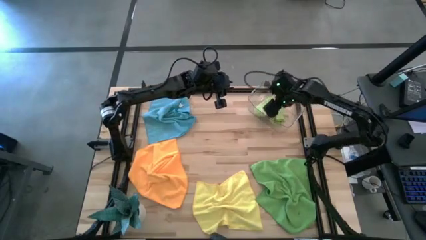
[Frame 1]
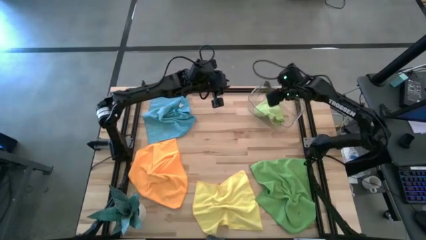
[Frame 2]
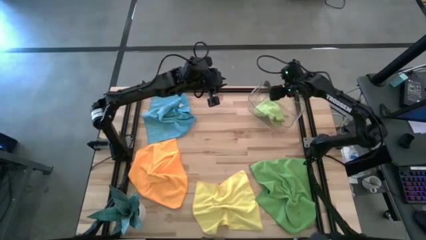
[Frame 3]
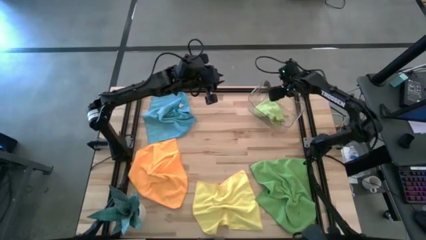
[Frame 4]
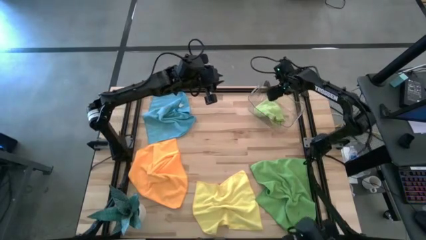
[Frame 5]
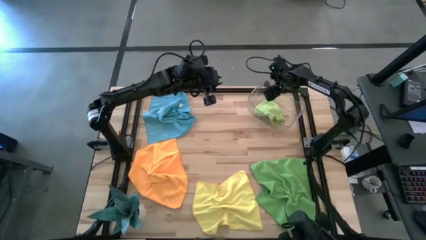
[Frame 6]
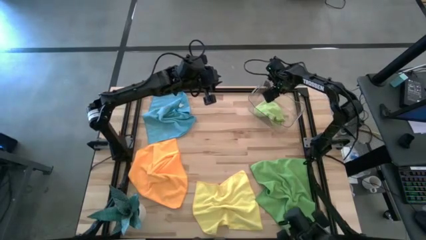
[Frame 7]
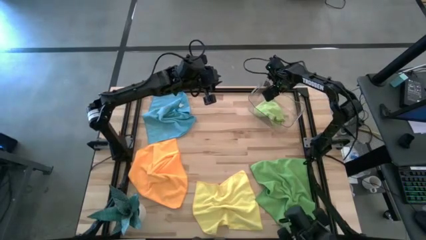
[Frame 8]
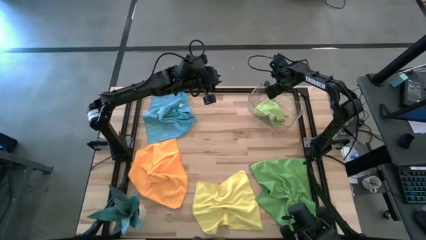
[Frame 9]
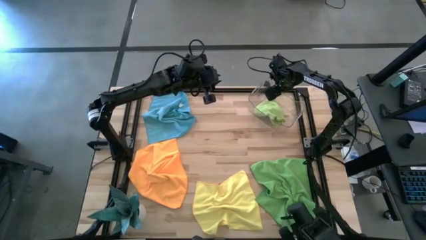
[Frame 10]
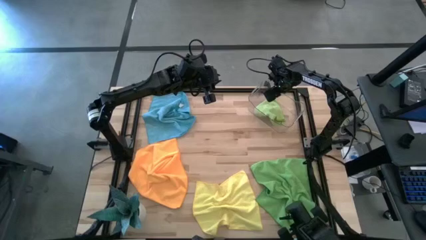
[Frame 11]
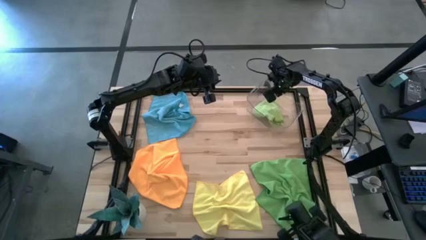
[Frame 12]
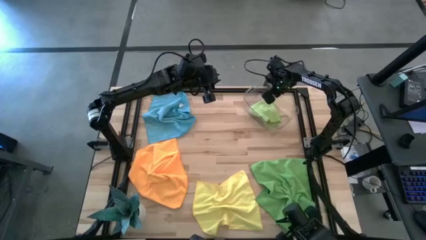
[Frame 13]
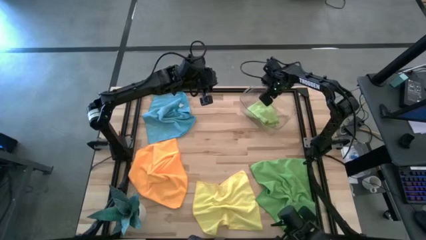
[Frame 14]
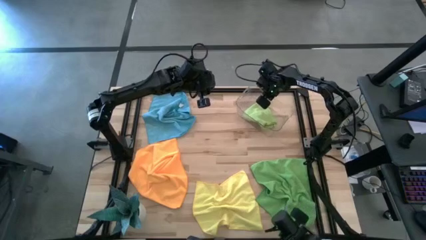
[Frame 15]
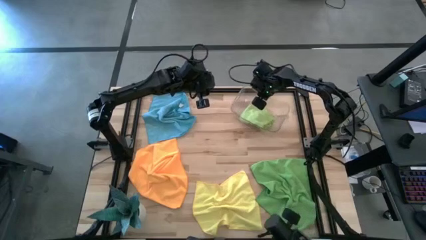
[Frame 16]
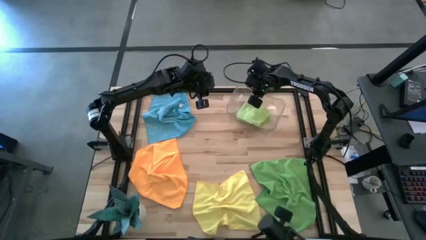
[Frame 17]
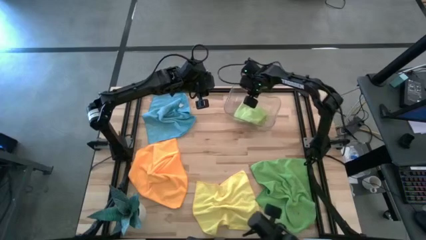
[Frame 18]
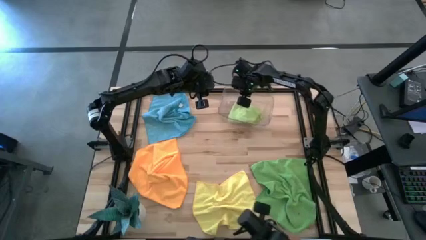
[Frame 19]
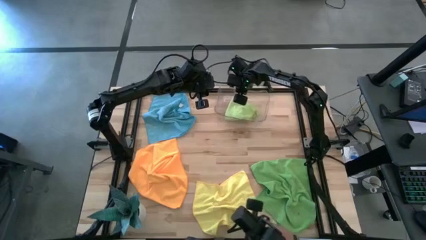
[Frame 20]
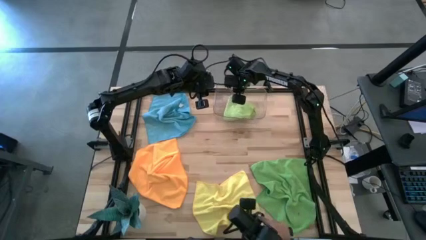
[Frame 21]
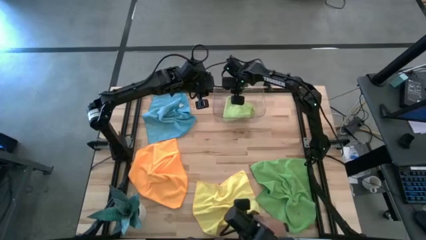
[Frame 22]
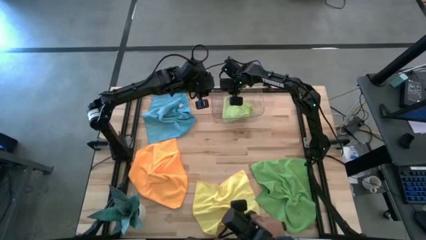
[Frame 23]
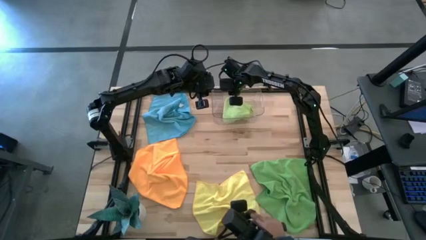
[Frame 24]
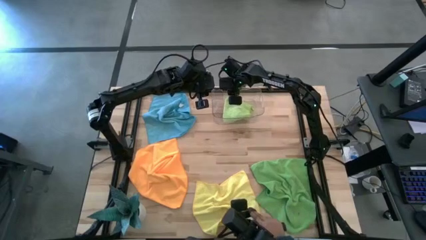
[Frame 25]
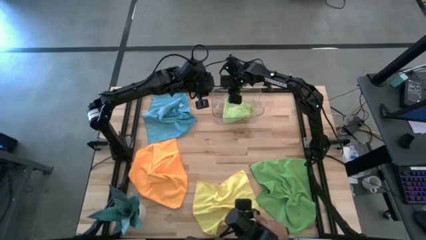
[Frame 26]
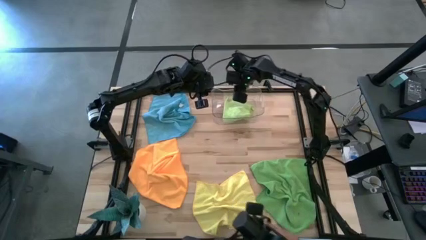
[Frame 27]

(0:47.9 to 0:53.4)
Task: Fold microfiber towels
Move the transparent bin to the top center of the table

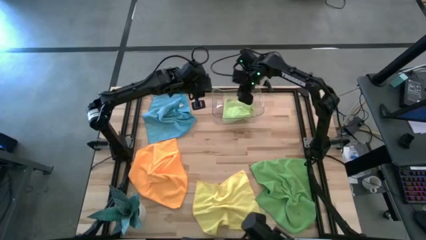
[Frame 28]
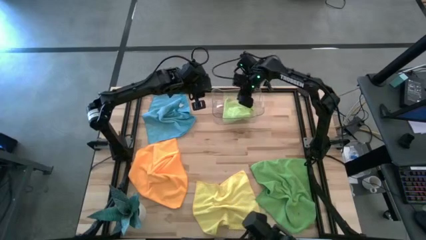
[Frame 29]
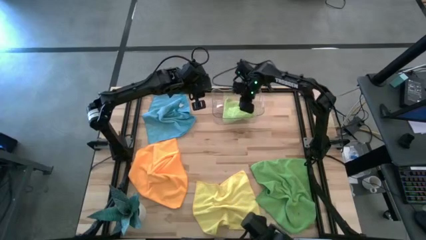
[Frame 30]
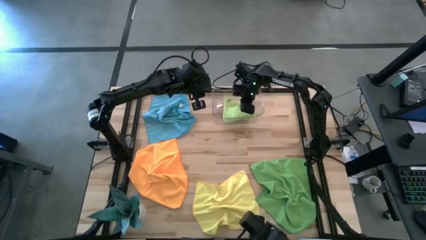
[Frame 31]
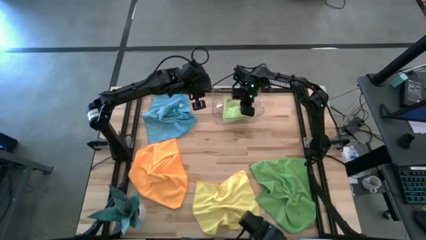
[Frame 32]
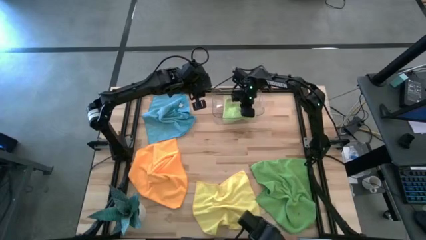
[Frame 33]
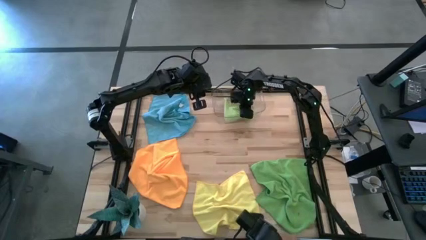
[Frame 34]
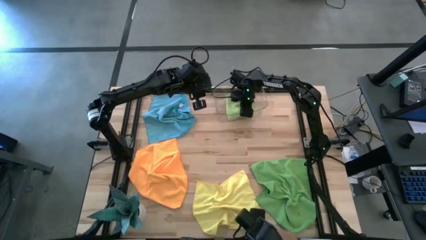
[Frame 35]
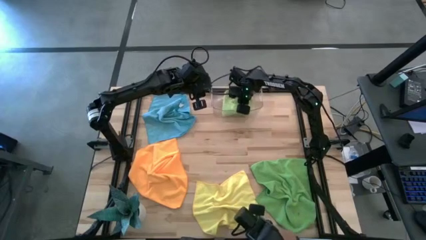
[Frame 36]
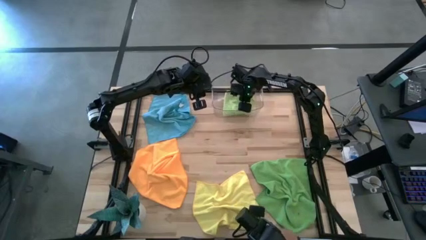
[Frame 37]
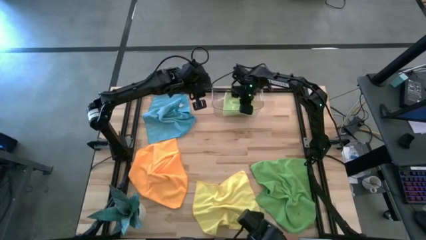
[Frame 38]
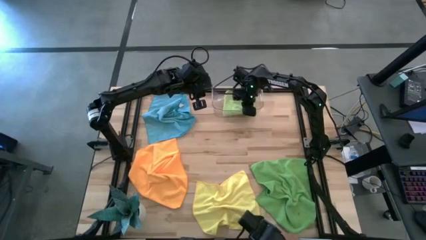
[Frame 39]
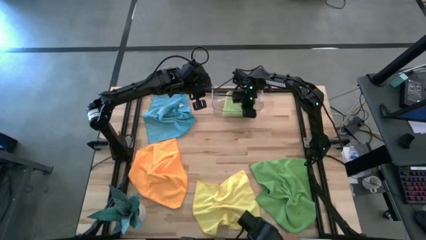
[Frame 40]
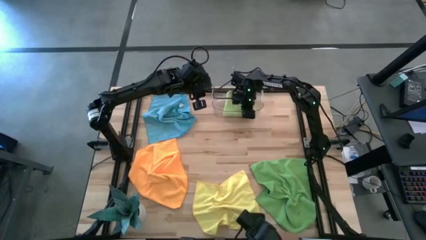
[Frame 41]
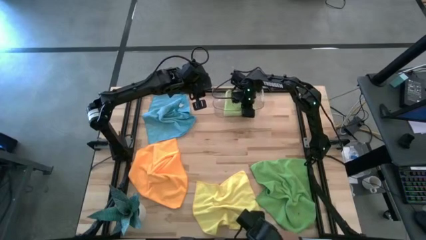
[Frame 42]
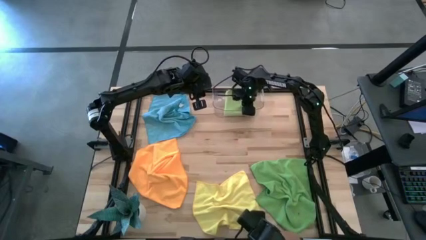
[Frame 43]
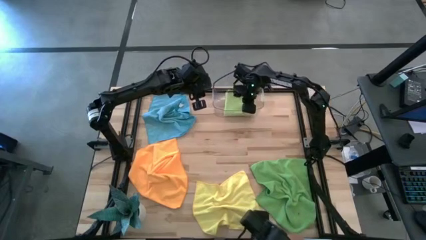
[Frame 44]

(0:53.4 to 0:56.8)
Adjust the light green cloth into the transparent bin

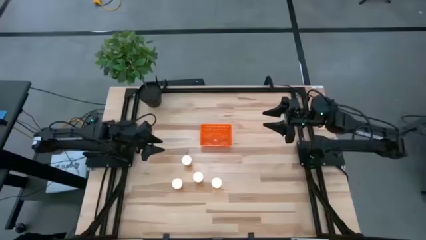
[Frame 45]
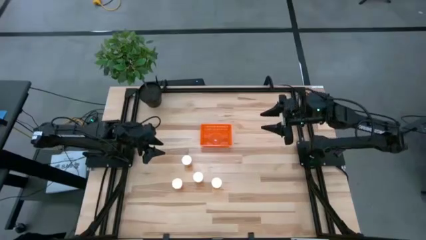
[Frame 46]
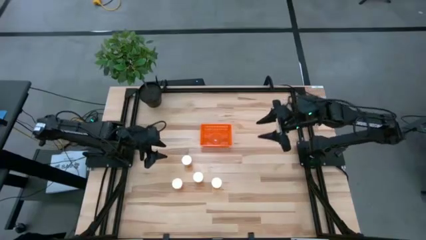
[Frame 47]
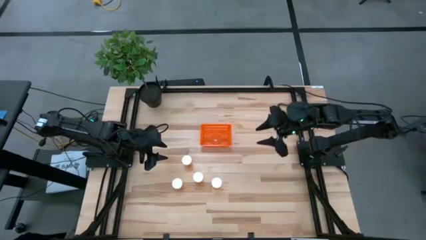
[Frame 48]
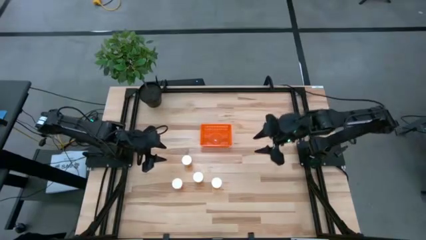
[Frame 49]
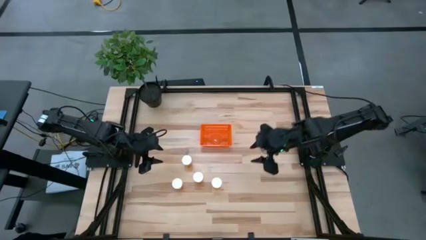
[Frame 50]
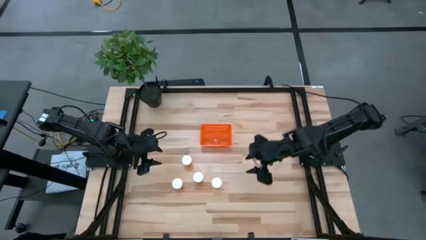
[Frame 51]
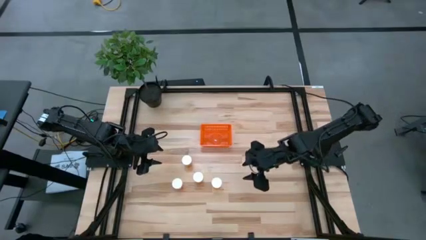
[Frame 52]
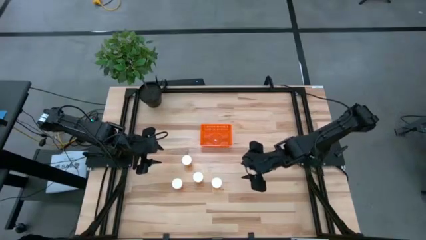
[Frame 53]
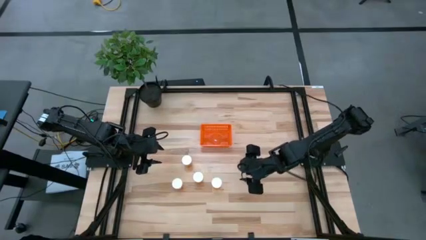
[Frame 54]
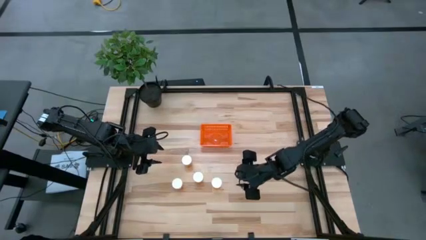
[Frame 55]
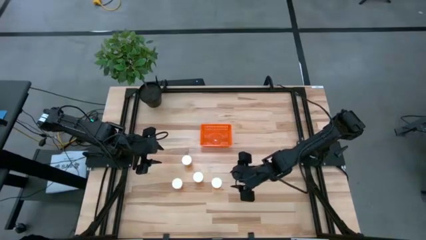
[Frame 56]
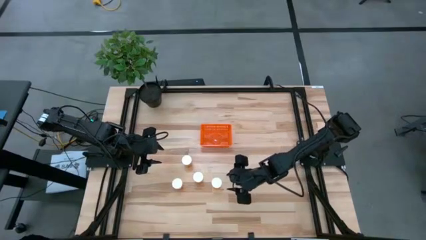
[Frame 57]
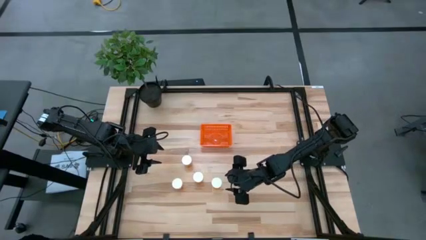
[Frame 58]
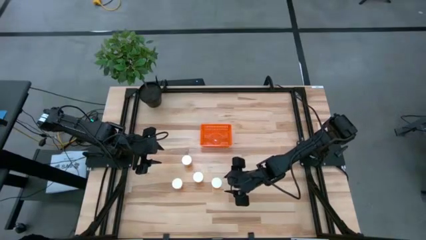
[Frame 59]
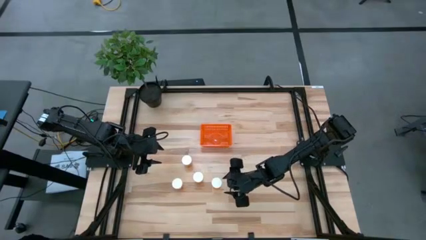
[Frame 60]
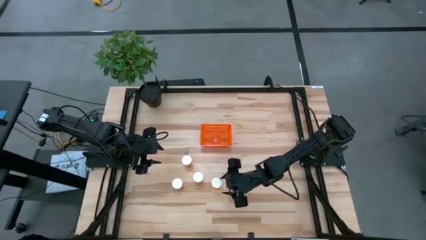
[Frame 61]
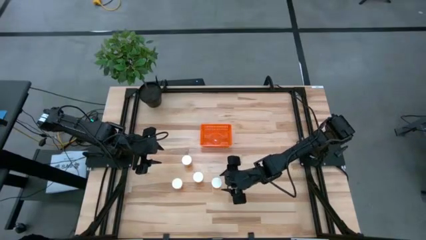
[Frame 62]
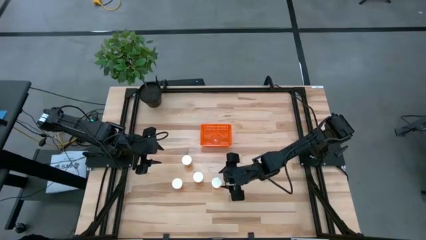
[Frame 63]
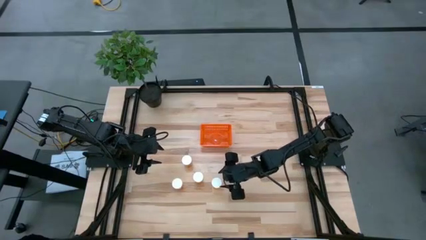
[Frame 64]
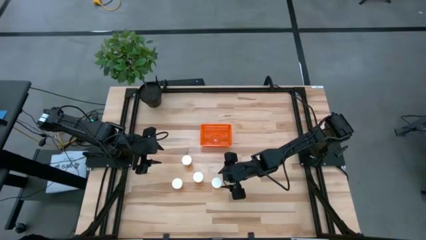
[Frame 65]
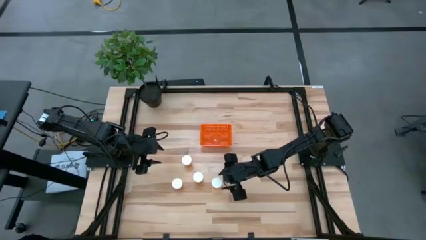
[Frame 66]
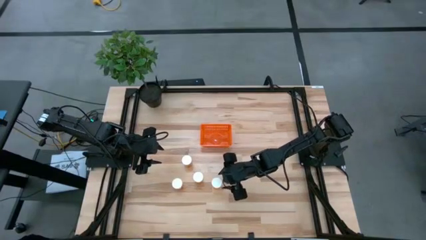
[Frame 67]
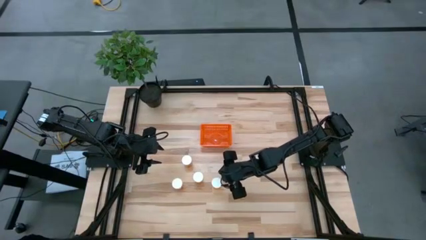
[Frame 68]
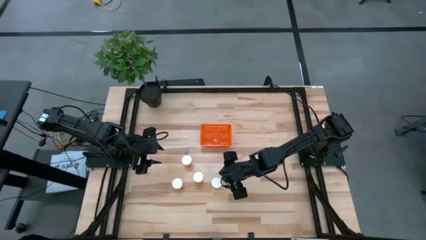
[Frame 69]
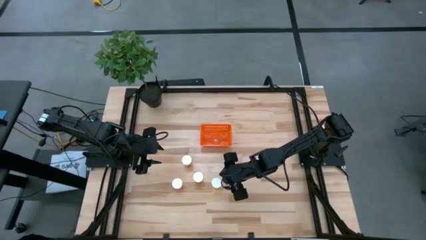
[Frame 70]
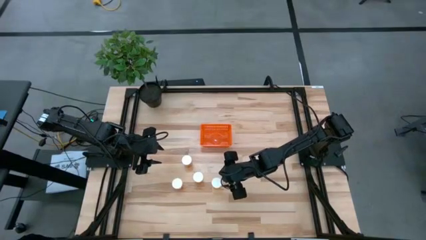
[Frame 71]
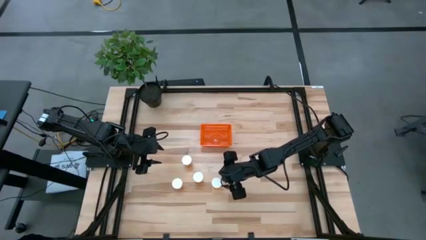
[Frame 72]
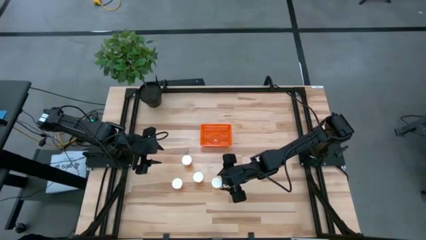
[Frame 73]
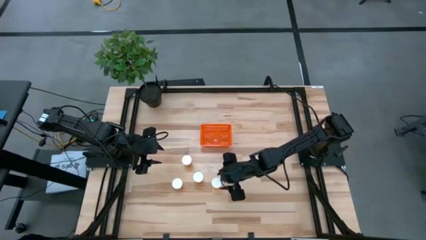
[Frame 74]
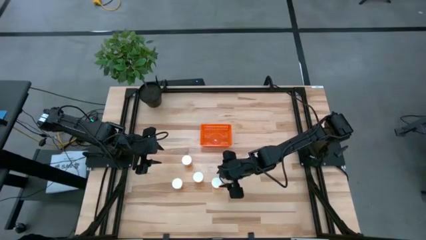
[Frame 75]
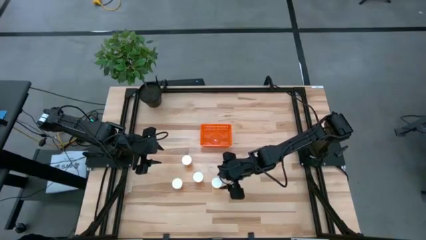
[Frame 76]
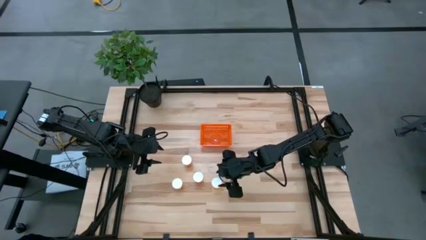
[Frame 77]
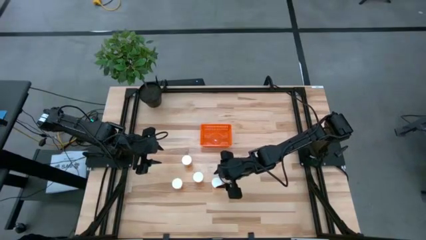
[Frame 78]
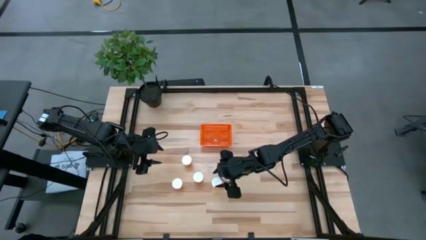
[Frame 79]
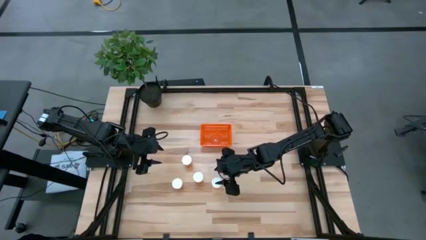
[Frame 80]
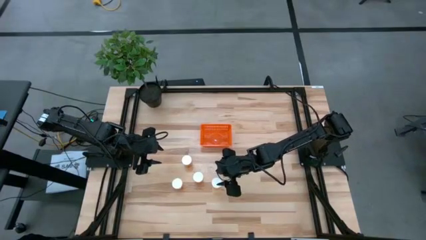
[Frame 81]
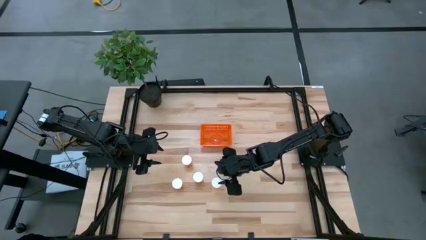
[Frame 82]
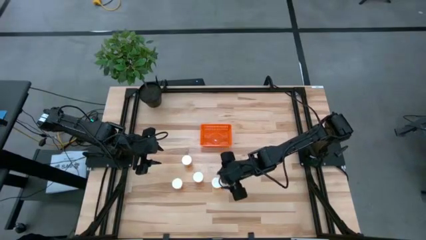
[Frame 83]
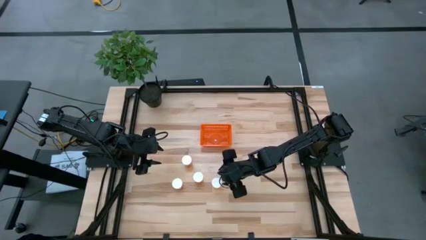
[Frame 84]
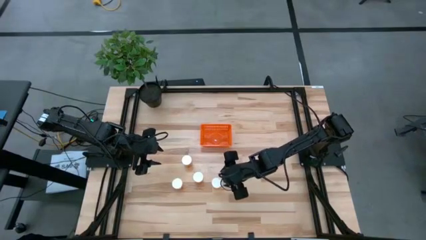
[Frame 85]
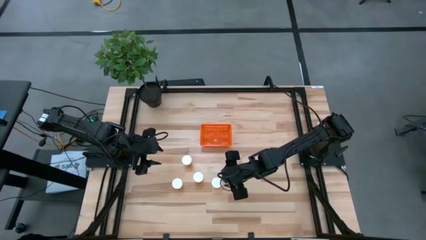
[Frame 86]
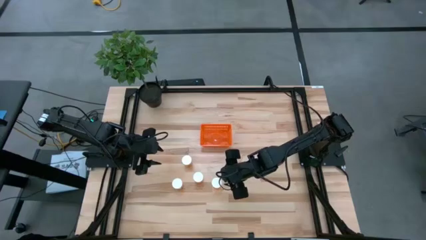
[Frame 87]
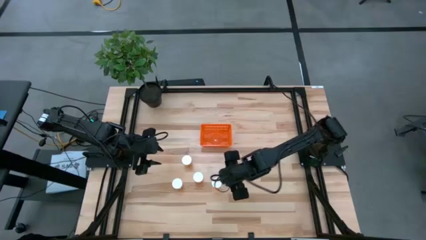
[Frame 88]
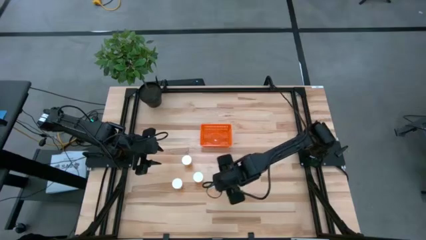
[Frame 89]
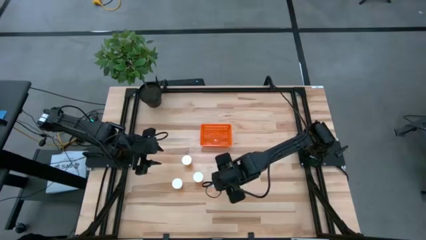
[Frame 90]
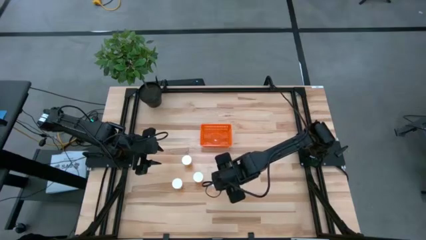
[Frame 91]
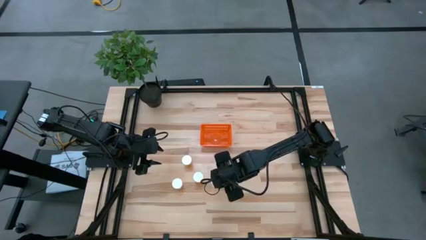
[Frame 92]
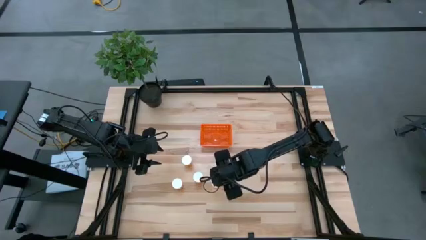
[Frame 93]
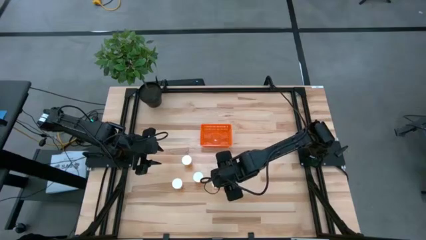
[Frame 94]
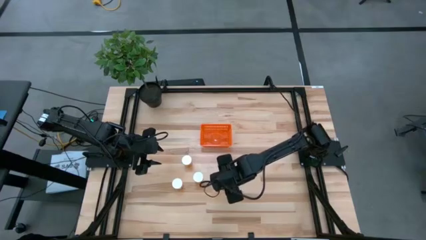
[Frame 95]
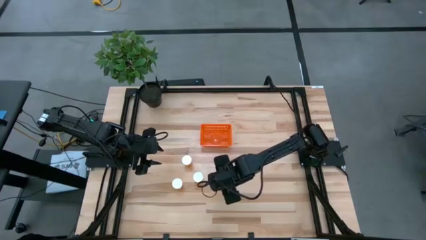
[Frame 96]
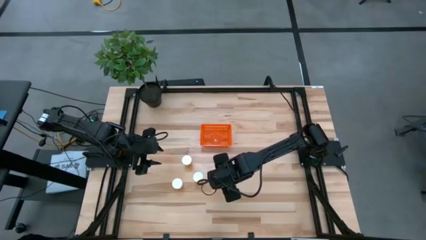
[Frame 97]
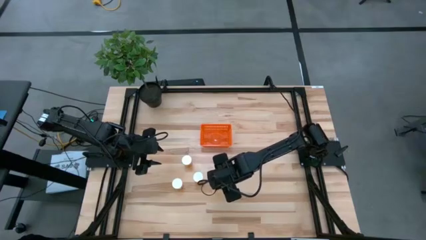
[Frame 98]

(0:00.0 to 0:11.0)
Task: Pick and place pill bottles into a basket
Put the orange pill bottle into the orange basket
